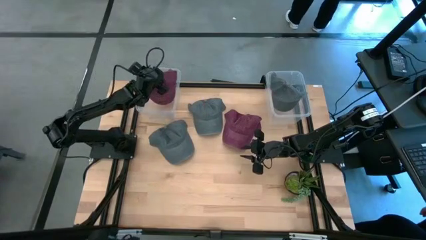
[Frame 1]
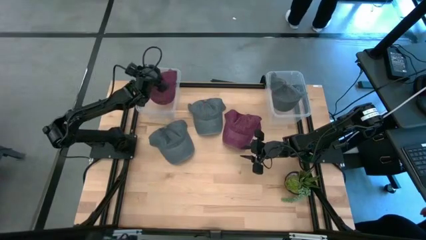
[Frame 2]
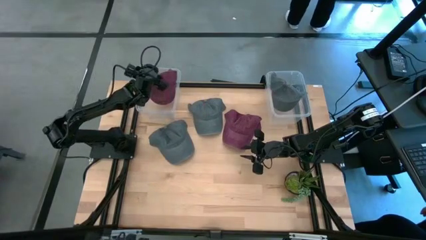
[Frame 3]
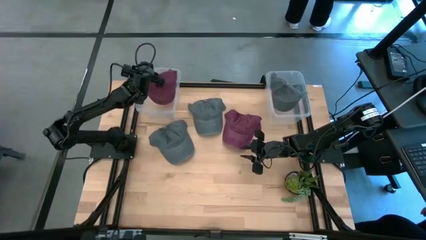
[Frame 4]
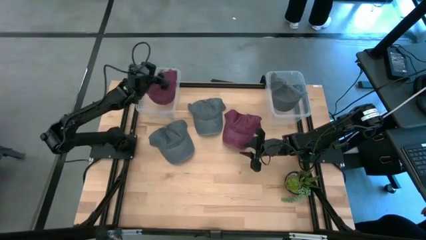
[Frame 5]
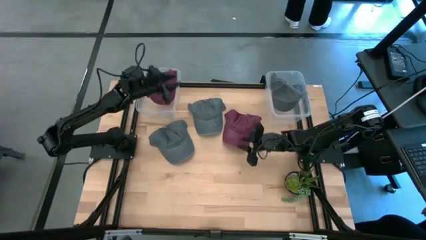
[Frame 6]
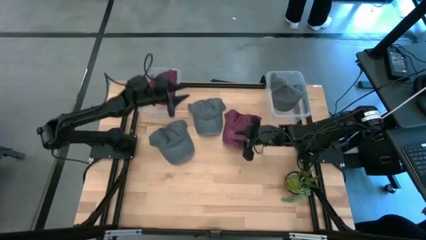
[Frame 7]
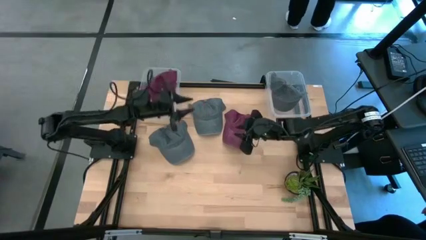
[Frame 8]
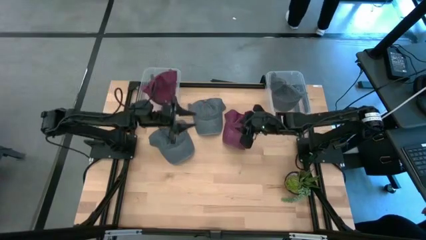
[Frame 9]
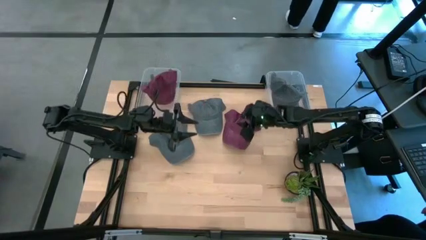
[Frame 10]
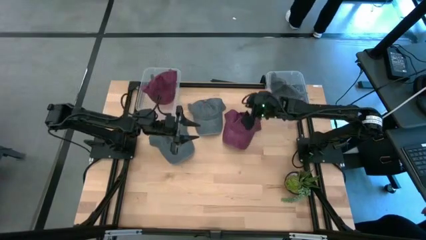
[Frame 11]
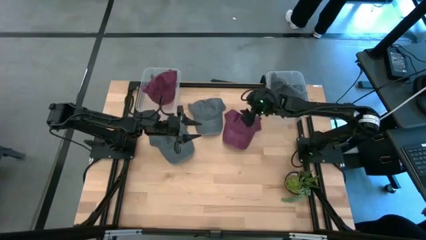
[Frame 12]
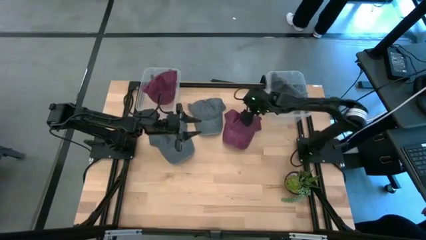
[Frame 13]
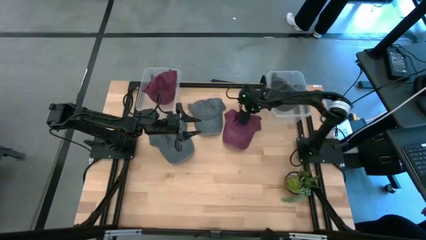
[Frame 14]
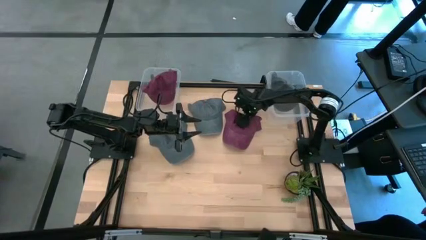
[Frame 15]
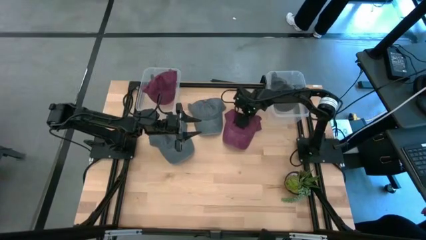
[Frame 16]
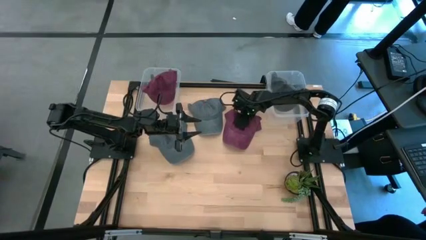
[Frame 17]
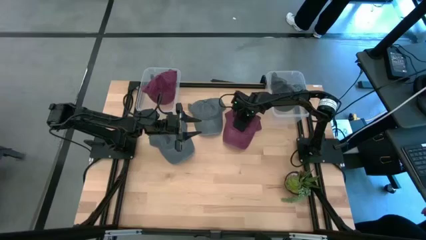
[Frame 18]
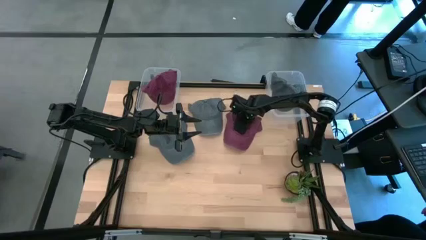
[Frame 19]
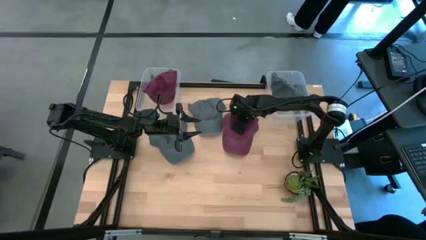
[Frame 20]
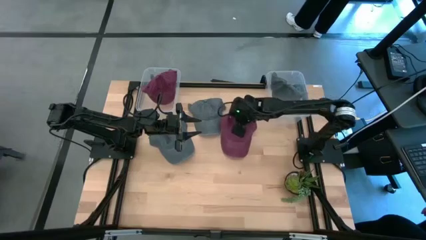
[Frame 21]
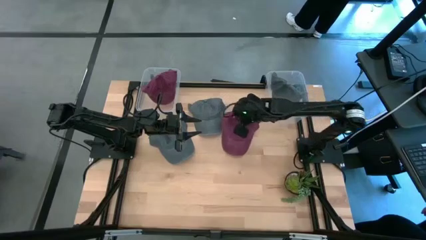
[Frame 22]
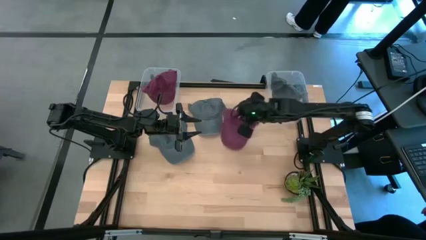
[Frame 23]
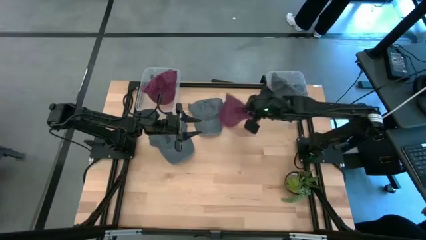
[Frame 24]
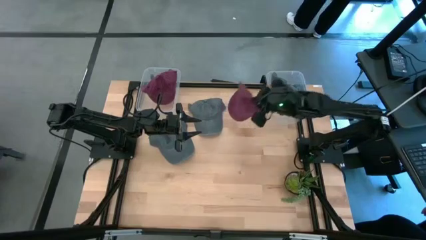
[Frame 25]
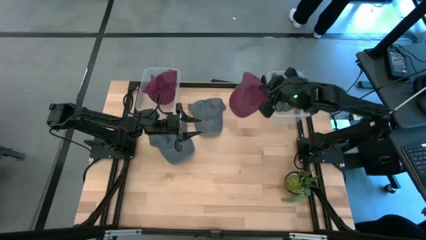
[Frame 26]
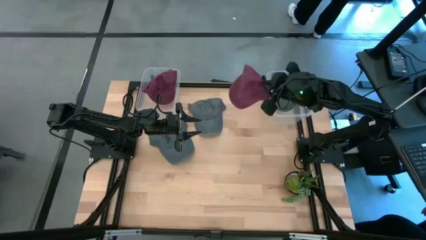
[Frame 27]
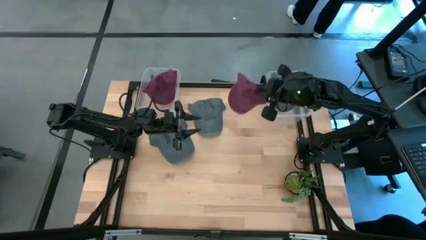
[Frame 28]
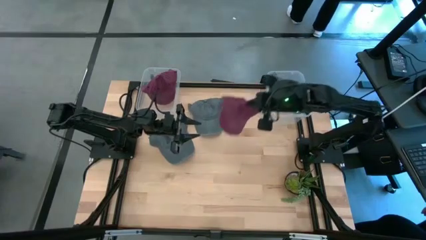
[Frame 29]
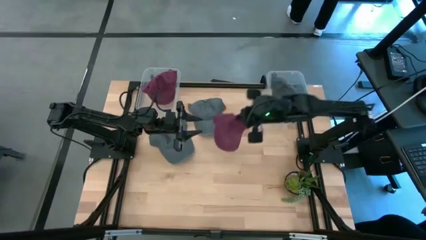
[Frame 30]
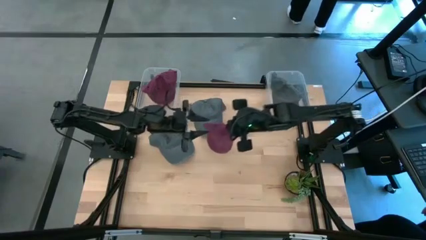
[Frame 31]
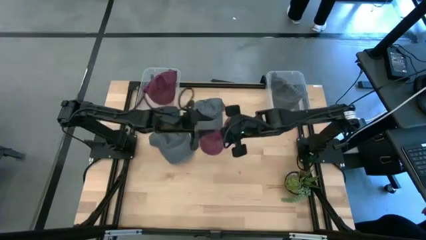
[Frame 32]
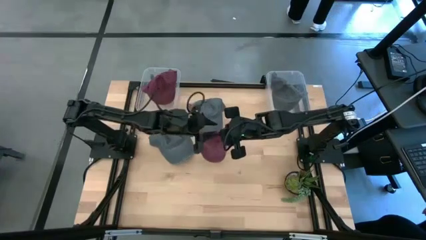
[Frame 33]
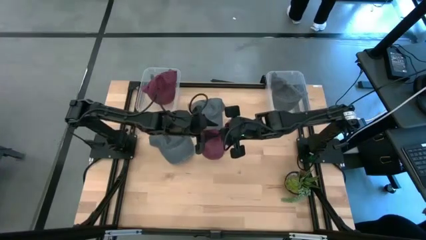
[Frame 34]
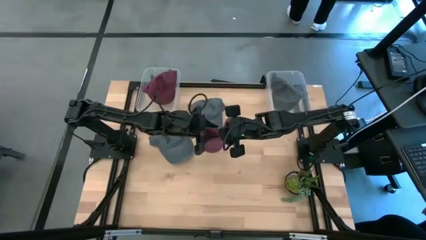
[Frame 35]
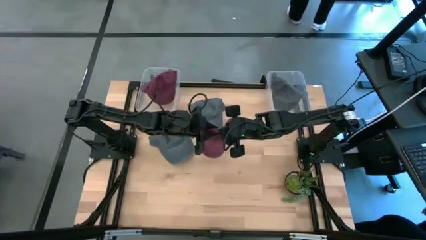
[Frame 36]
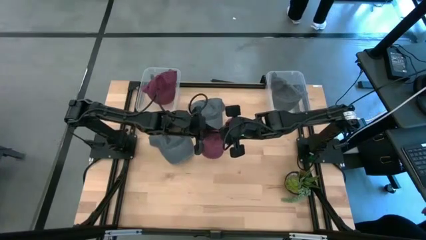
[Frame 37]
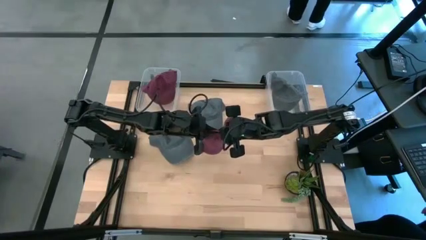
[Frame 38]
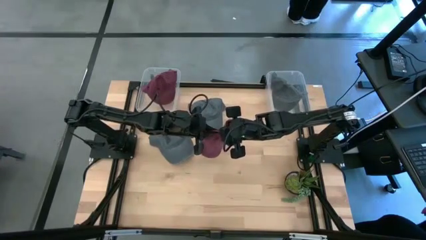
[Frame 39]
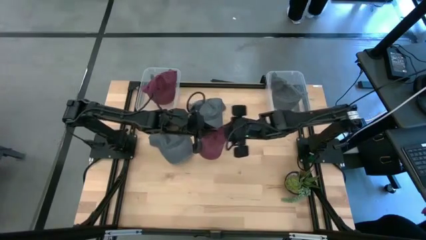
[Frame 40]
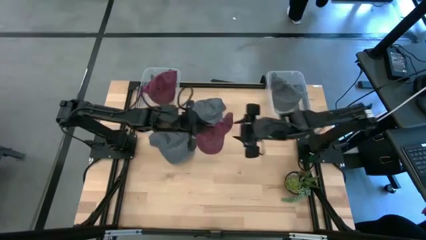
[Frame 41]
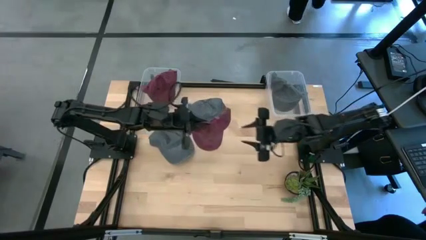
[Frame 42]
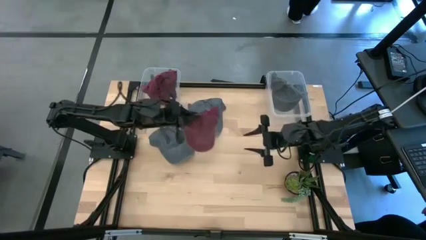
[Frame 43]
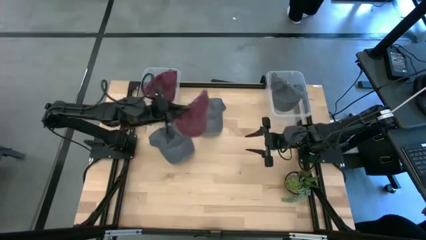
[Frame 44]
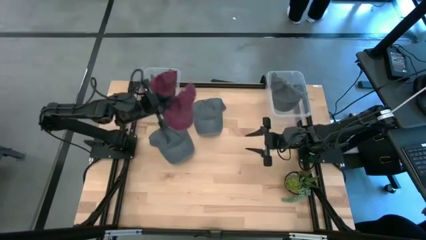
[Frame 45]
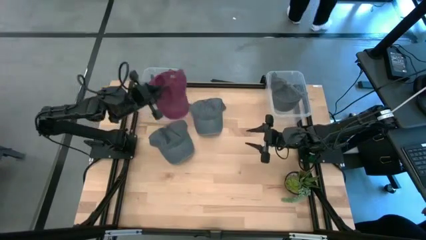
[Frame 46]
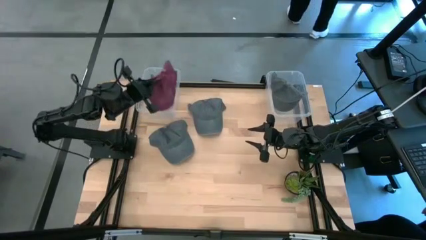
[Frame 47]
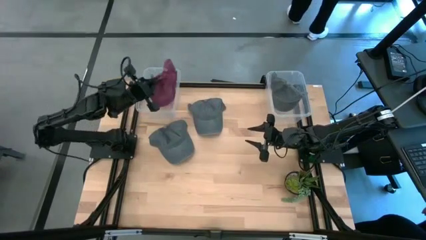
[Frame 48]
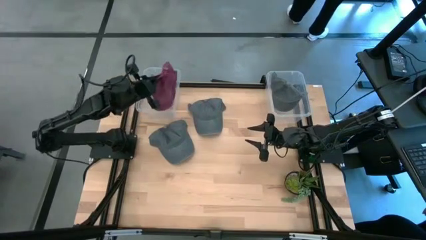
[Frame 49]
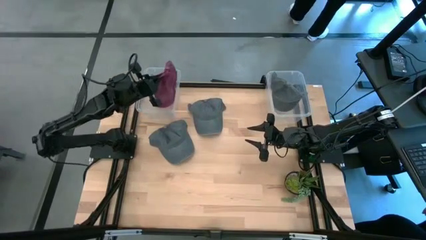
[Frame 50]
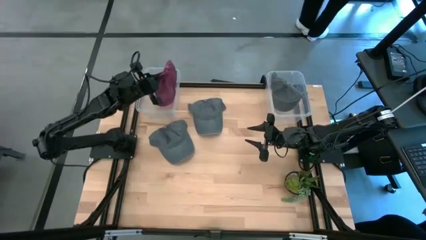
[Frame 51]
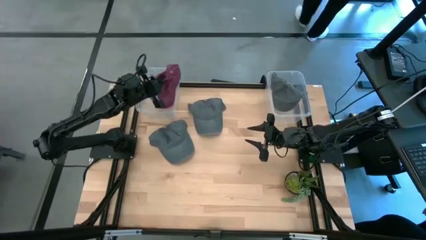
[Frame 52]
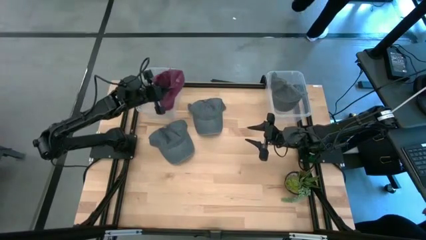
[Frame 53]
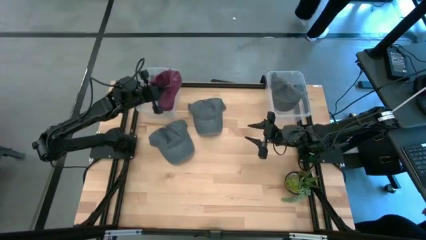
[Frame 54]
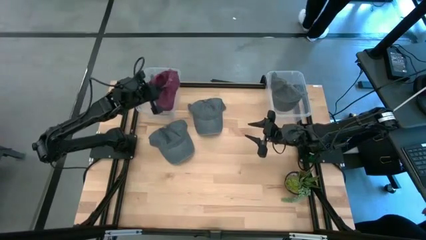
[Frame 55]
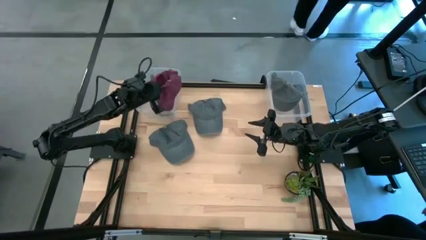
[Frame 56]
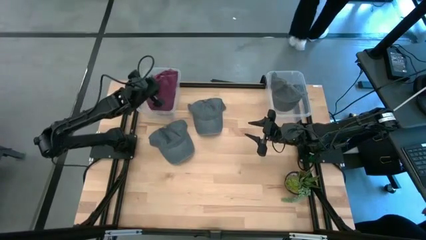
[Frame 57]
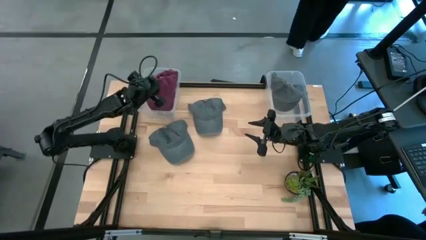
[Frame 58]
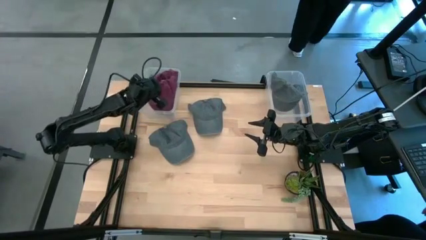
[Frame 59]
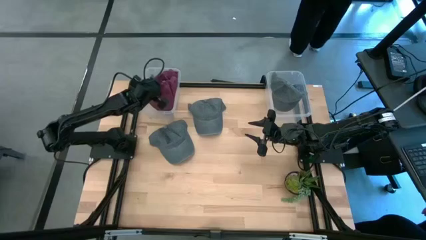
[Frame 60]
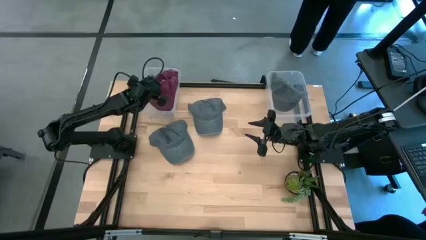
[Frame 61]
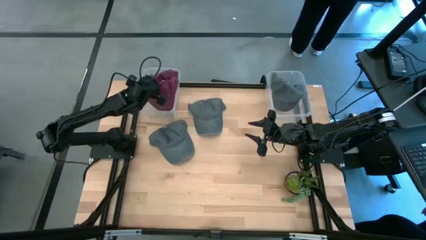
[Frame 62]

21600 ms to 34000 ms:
Task: Pick & Place hat
Put the red cap into the left transparent bin
